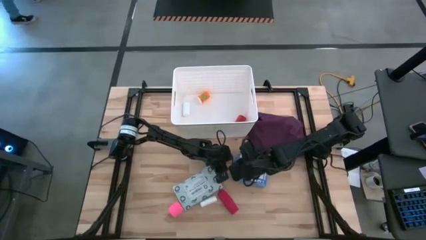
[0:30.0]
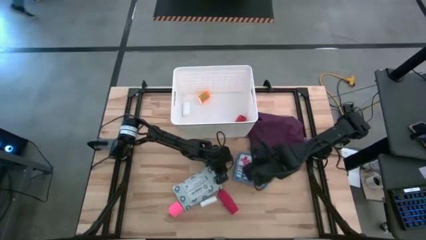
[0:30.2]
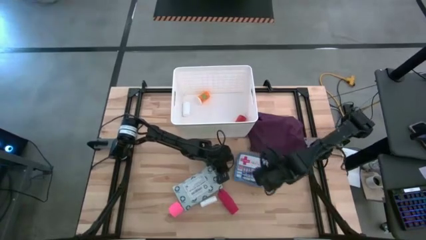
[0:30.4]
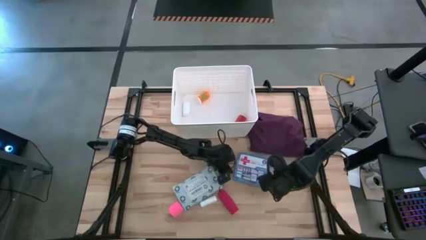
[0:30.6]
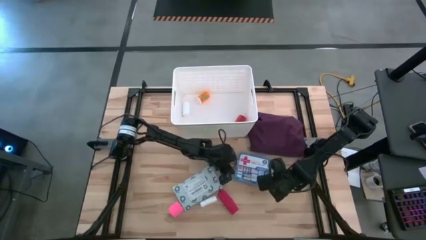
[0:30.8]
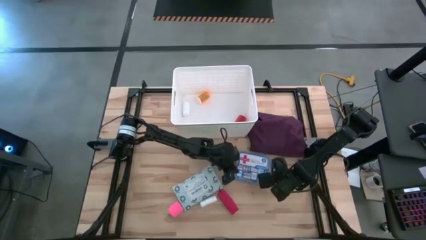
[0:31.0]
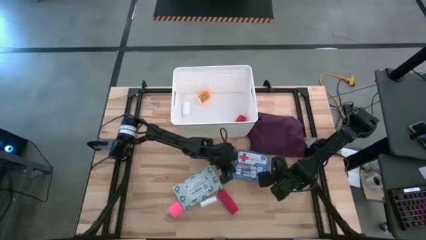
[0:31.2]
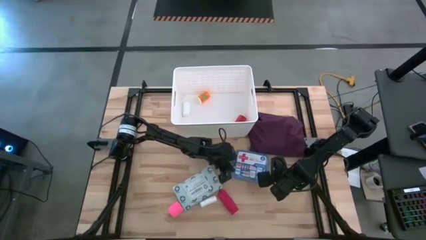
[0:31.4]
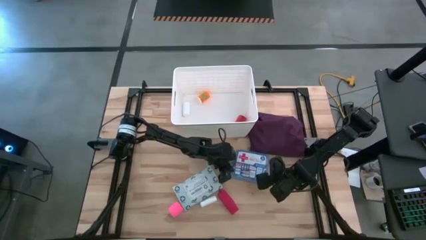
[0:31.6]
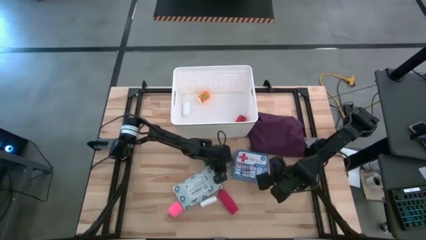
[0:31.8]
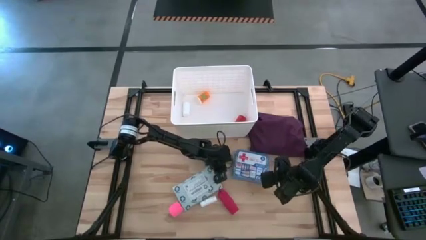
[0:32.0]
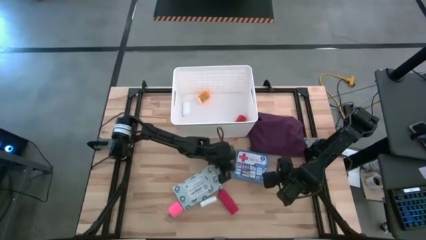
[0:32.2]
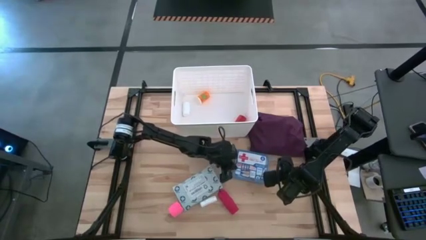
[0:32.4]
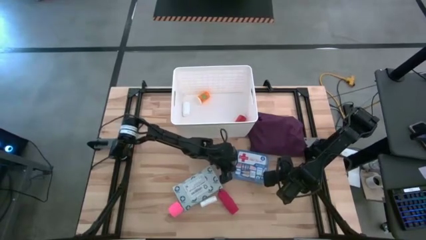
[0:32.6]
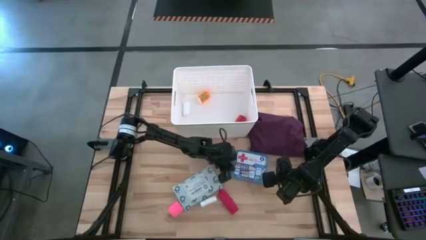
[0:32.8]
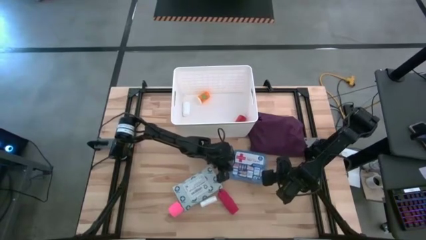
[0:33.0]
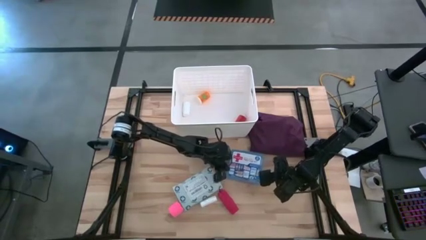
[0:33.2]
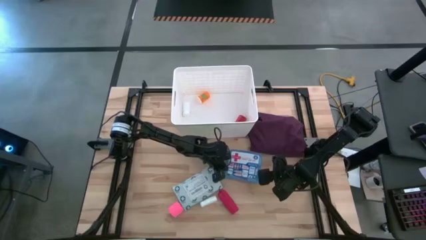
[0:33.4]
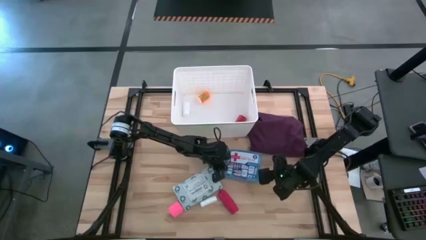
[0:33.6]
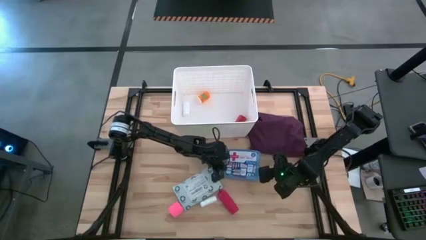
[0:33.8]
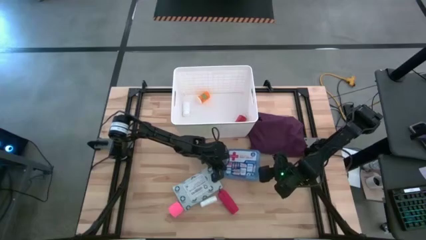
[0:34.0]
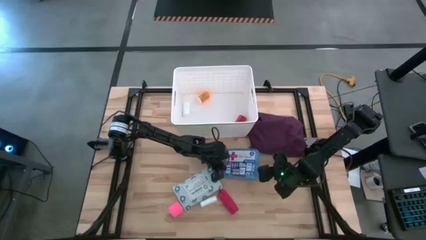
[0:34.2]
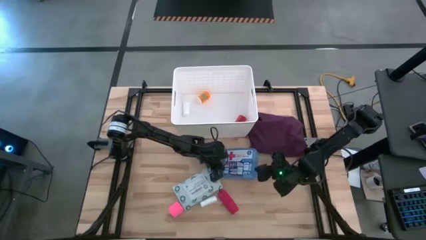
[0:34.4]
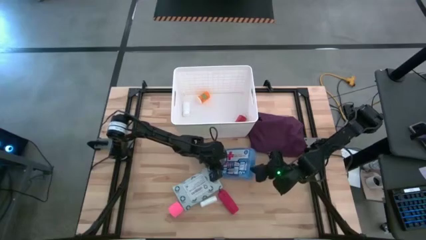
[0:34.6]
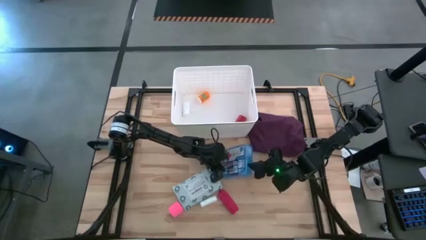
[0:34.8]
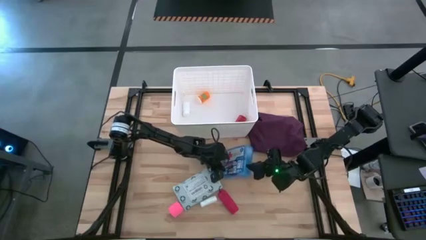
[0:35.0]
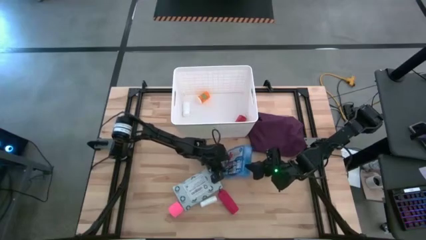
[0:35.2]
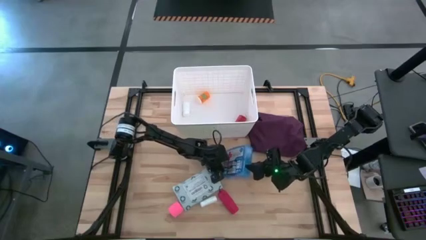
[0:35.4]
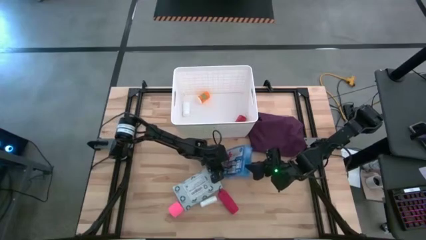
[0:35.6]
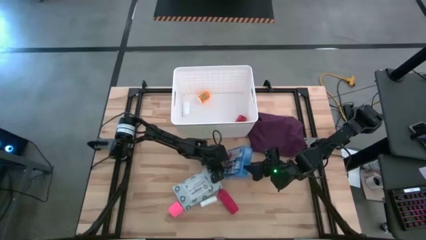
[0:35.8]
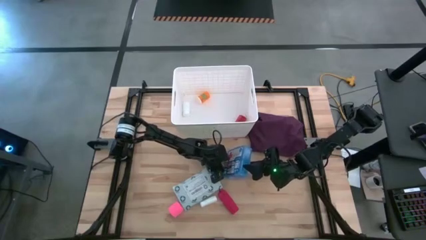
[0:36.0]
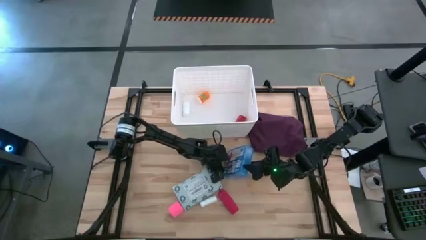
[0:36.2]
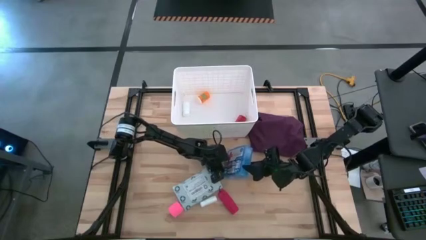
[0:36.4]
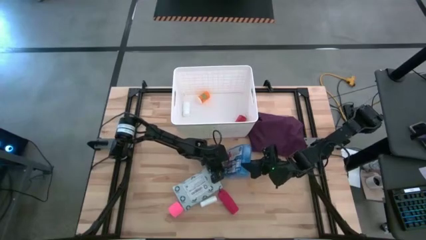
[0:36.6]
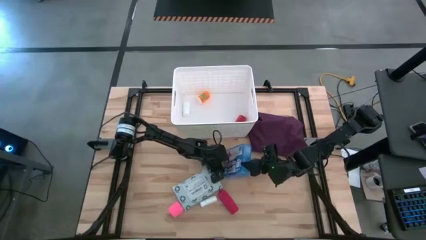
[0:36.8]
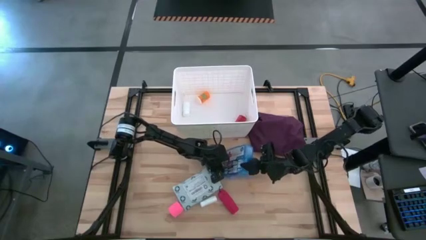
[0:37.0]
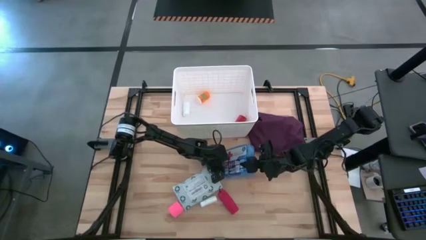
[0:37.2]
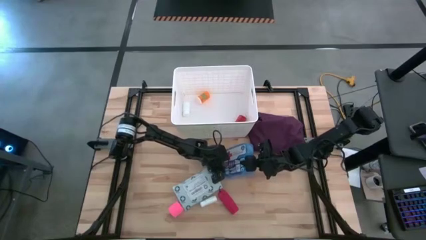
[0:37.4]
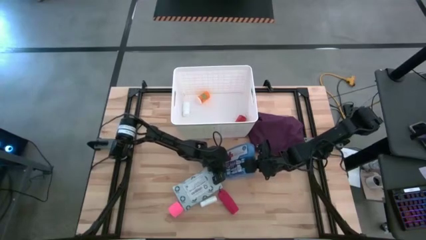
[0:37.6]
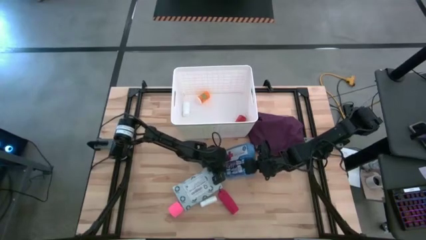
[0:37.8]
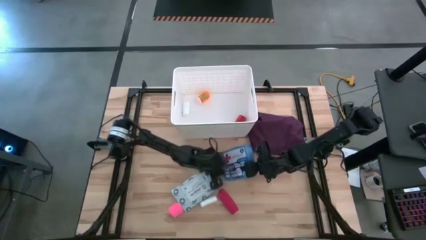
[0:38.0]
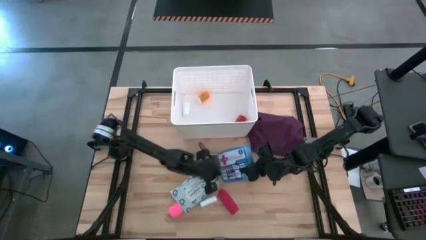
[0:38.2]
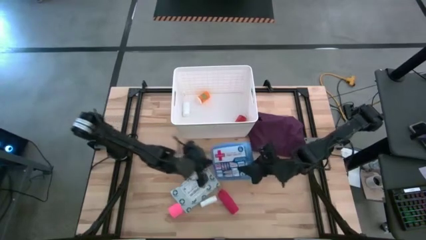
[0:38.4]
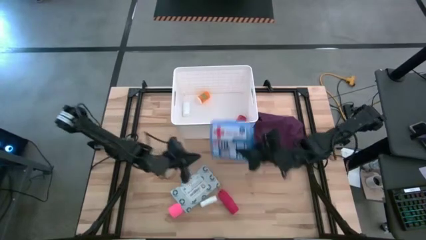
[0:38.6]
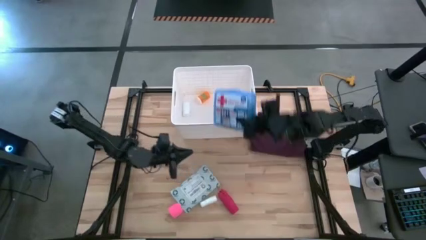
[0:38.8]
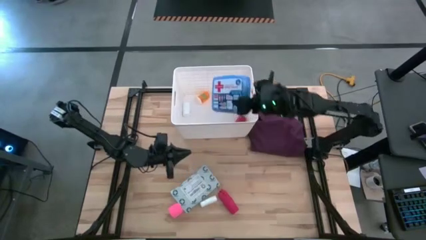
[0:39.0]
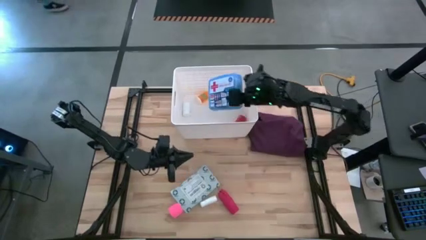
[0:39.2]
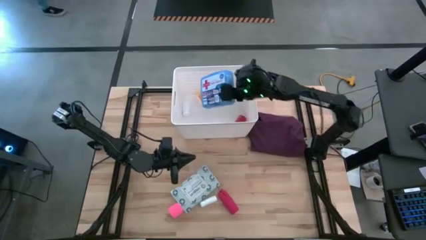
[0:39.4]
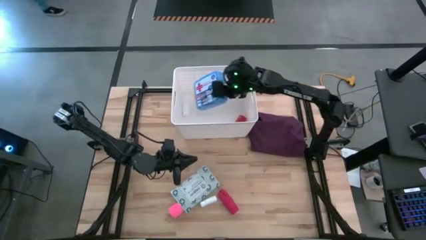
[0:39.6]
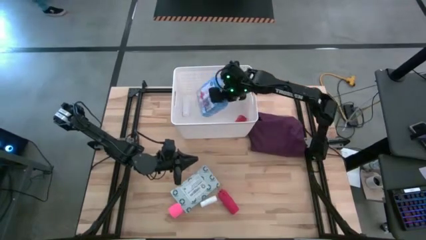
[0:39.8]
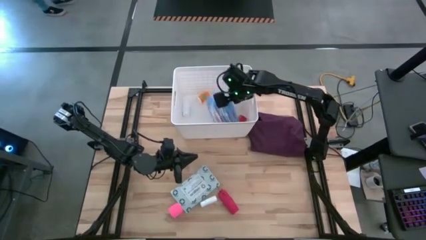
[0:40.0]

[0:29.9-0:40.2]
Task: Pick & place medical supplies in basket/bin
Put the blue first aid kit into the white bin

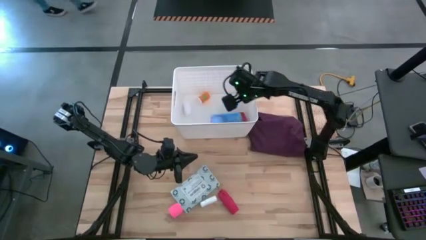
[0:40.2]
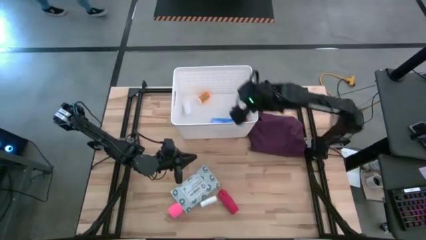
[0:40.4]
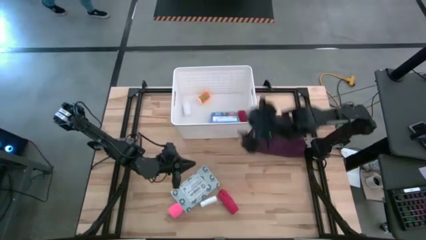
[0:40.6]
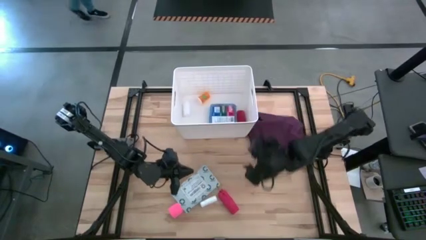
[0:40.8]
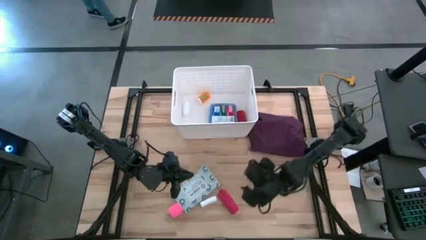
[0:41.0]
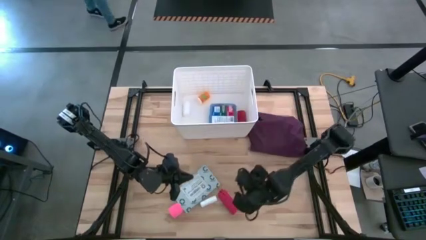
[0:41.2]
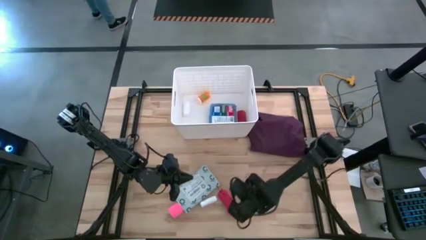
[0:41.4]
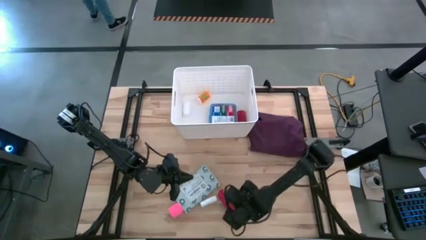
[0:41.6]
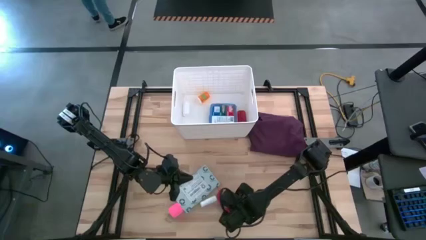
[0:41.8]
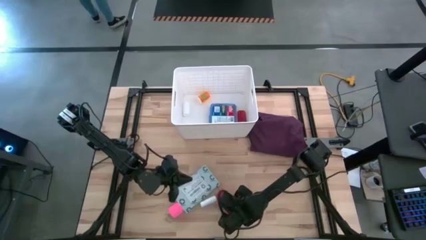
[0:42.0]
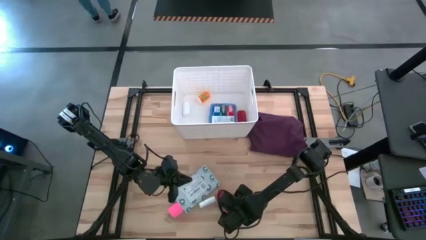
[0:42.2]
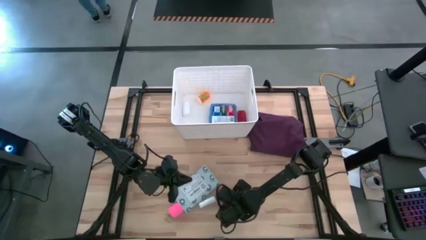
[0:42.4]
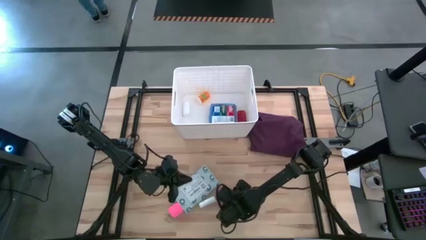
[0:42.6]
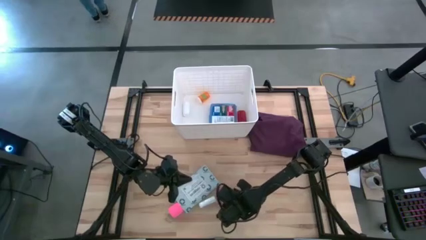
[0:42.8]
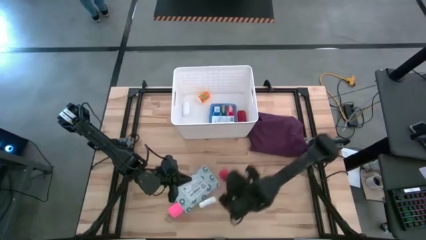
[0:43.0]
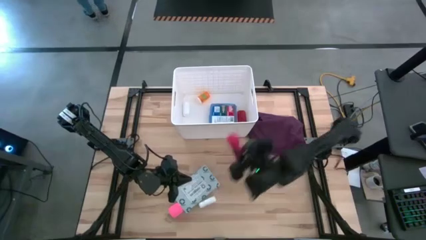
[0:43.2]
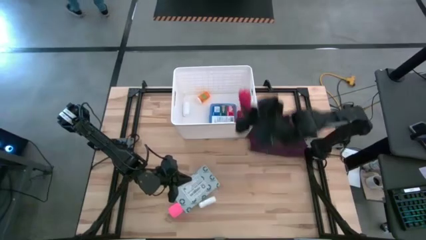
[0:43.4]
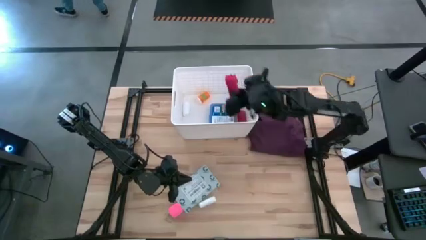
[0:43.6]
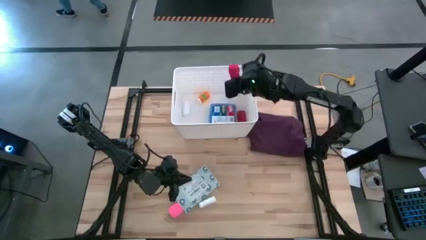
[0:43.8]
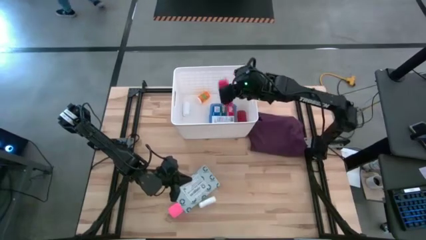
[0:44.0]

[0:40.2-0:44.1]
Put the red bandage into the white bin

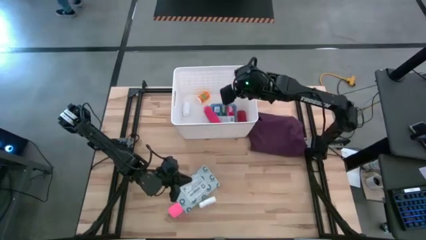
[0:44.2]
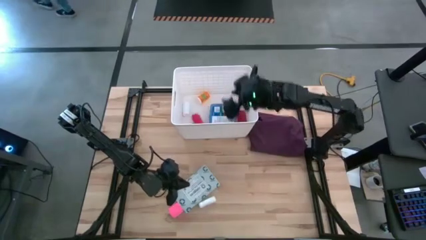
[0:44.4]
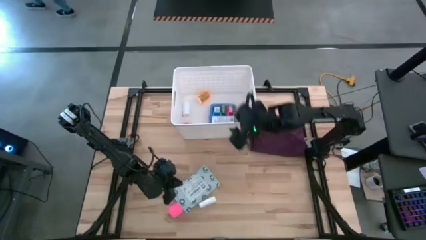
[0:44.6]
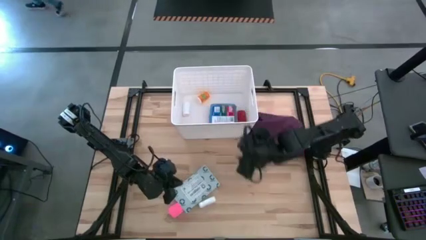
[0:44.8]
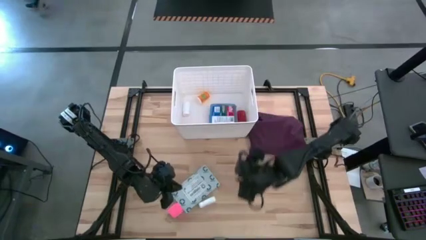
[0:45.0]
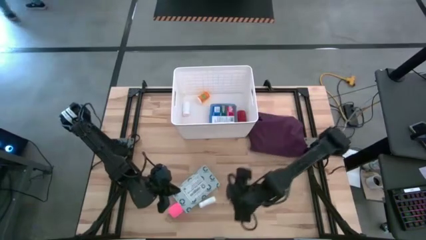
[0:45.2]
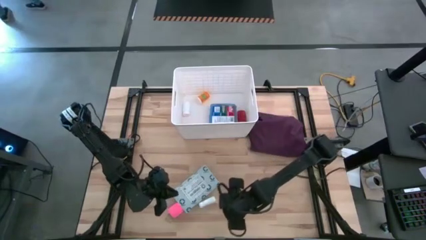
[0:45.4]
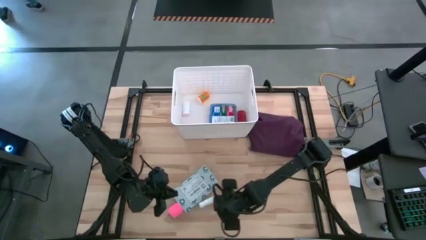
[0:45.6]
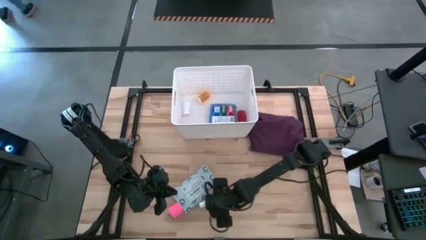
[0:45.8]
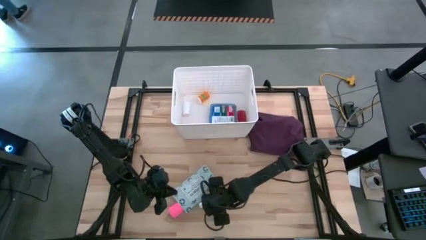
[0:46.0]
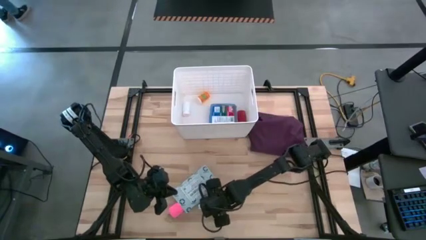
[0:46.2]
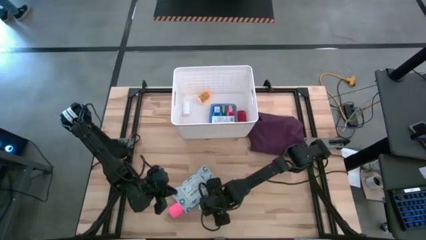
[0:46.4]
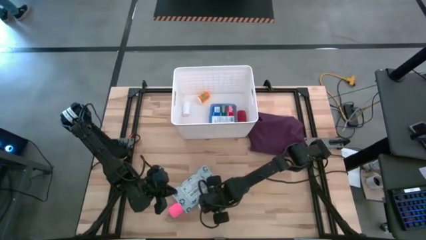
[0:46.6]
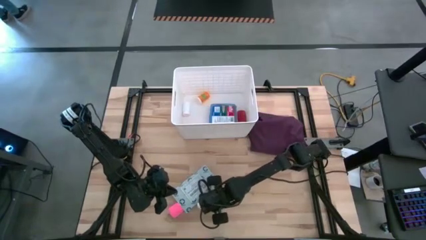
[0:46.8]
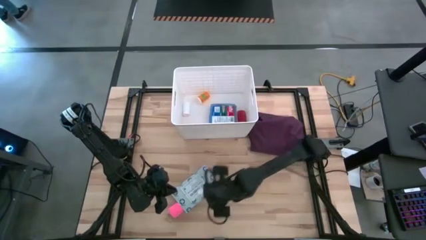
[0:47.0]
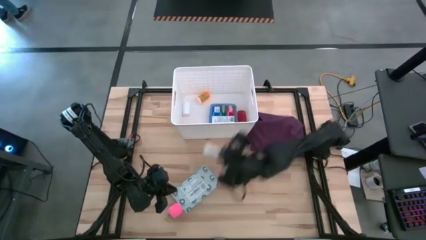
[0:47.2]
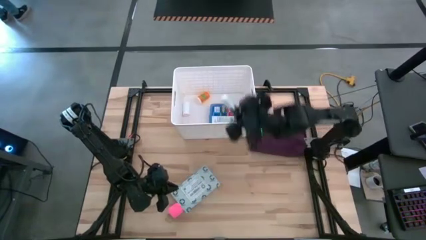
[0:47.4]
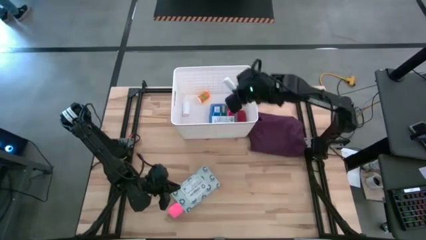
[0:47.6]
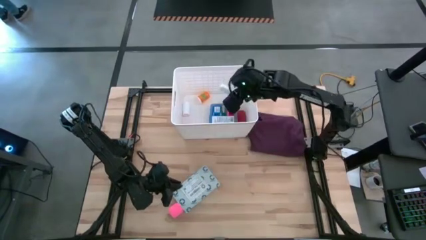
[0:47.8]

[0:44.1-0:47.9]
Put the white gauze into the white bin
